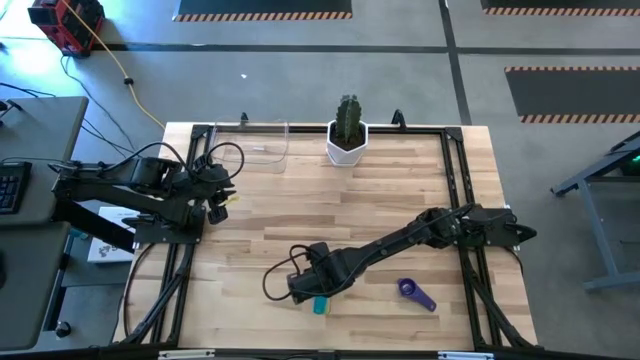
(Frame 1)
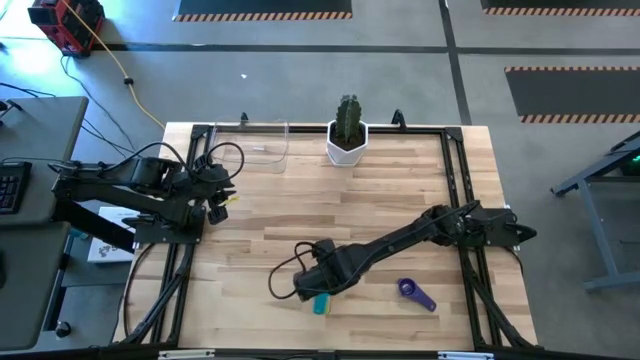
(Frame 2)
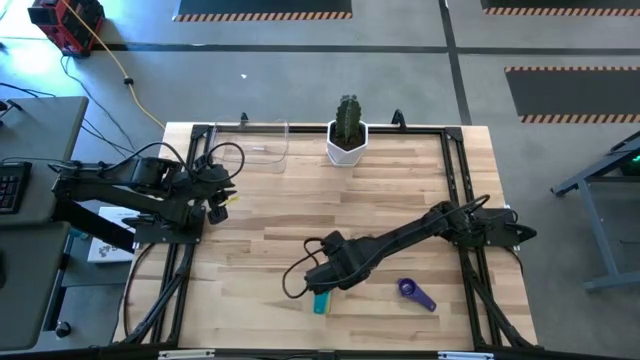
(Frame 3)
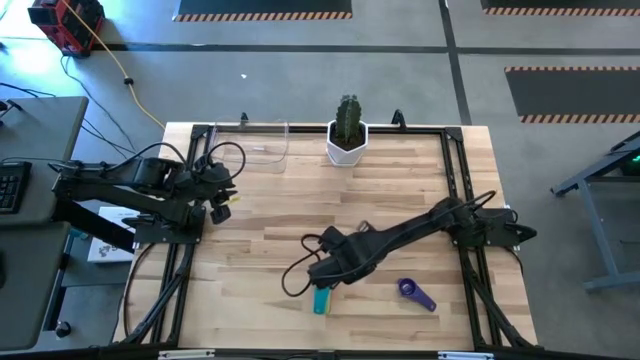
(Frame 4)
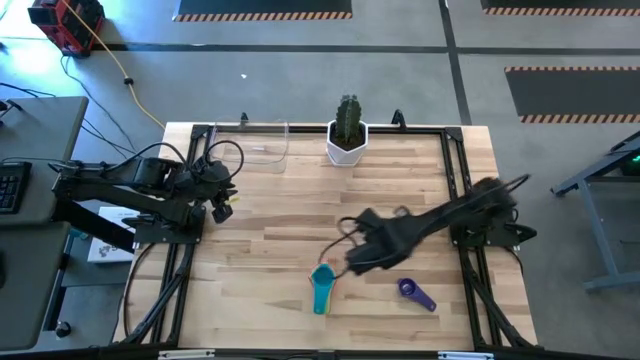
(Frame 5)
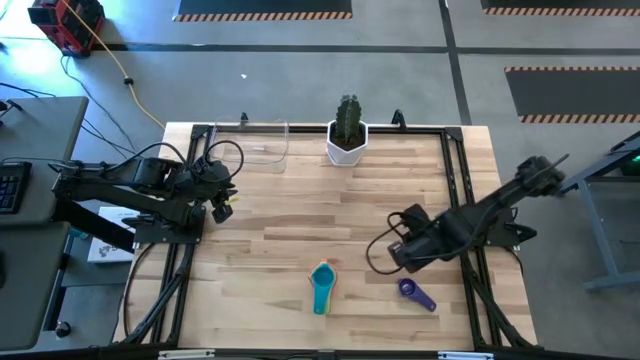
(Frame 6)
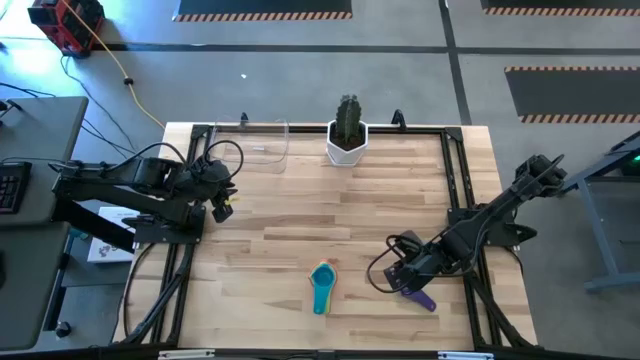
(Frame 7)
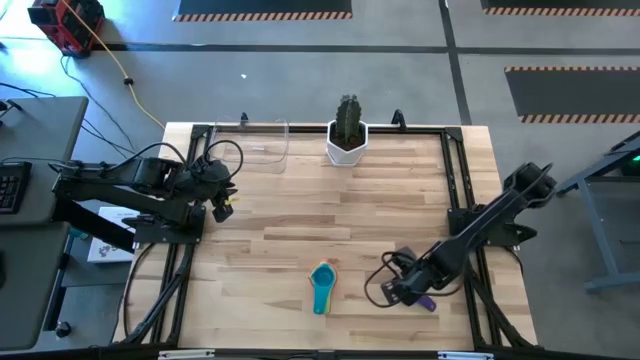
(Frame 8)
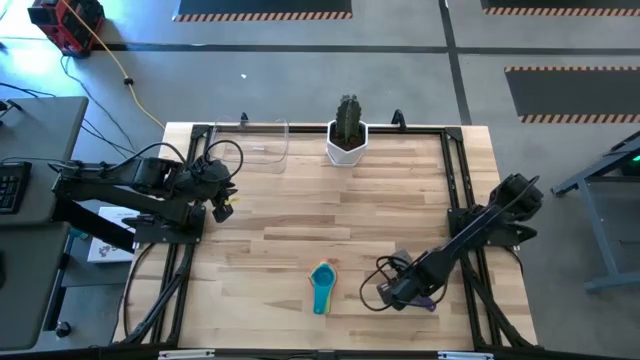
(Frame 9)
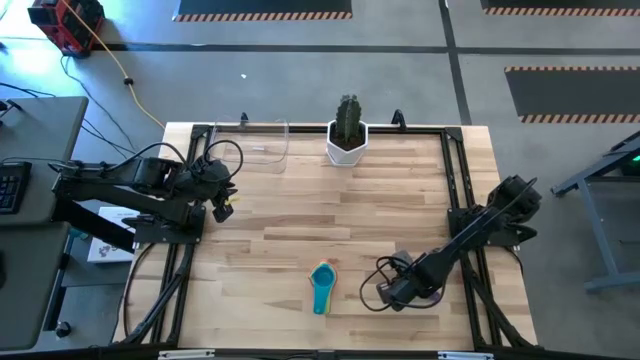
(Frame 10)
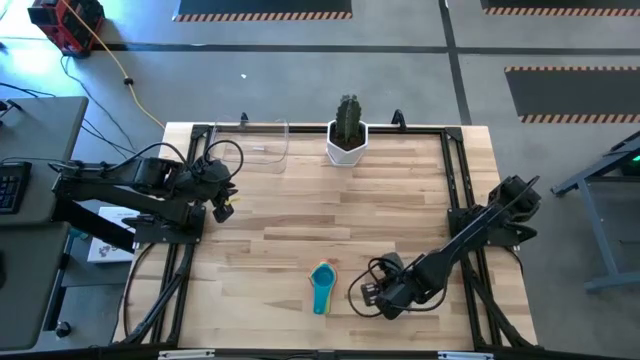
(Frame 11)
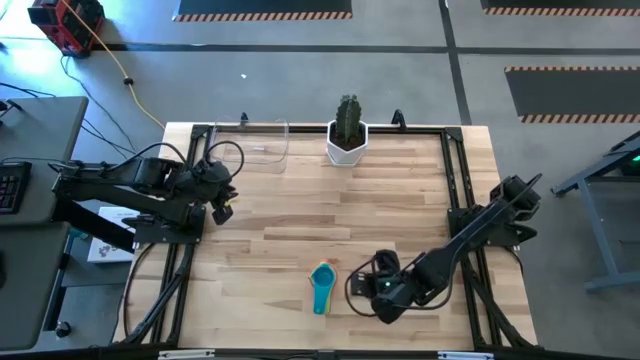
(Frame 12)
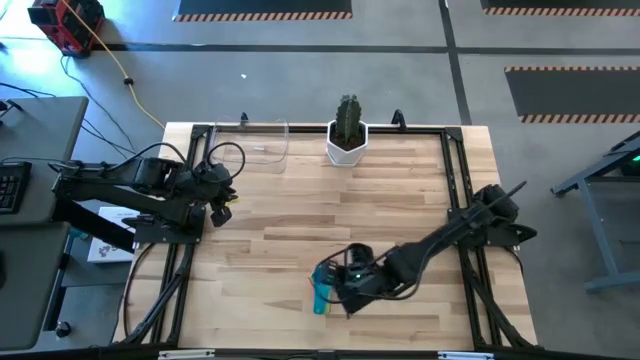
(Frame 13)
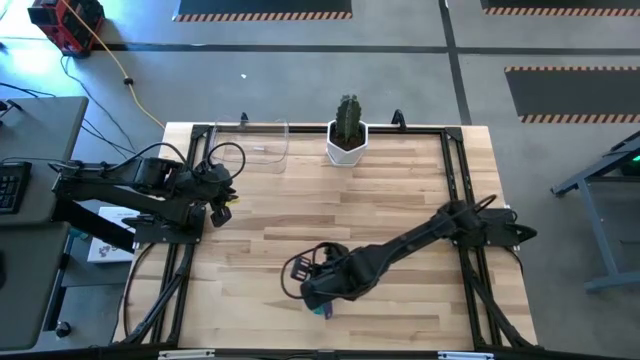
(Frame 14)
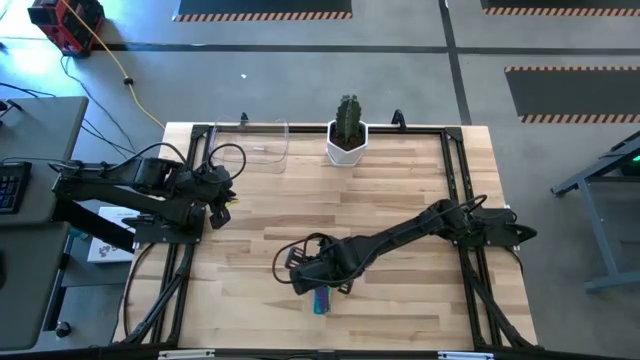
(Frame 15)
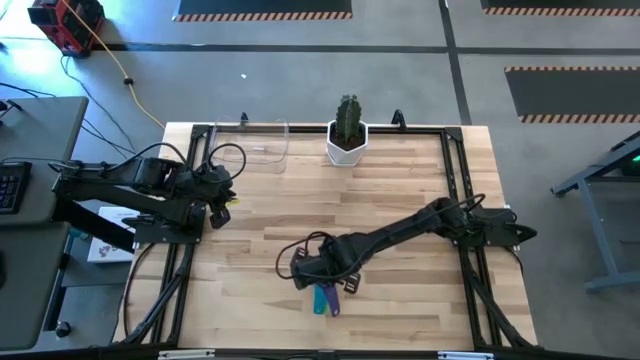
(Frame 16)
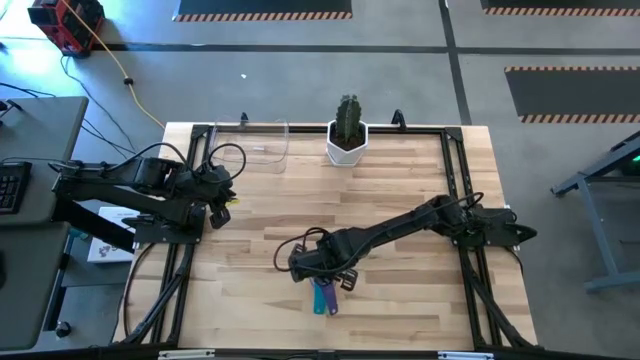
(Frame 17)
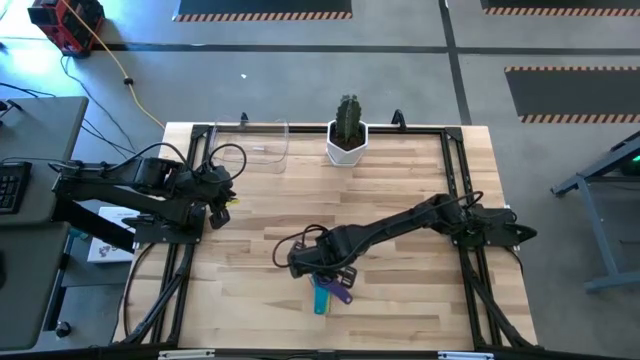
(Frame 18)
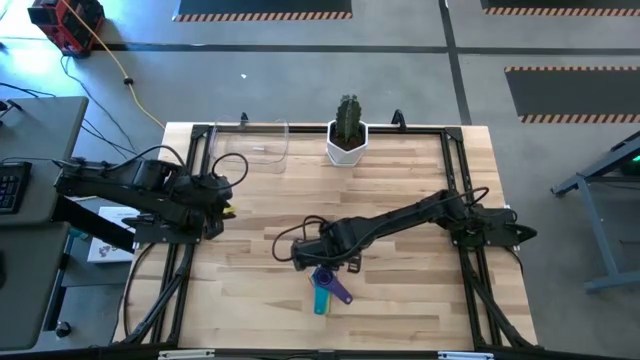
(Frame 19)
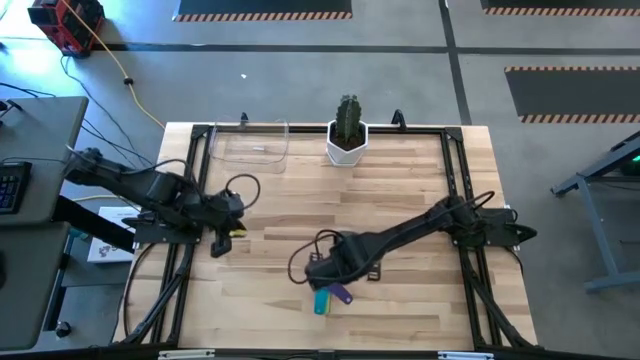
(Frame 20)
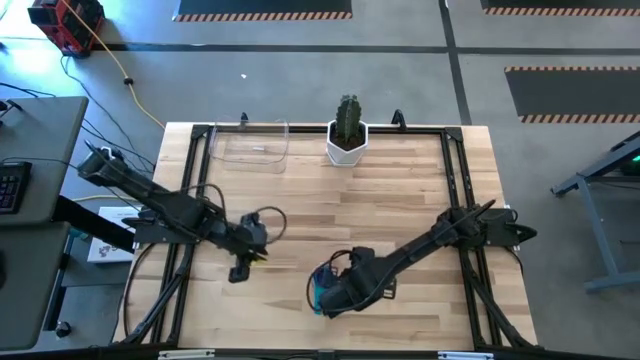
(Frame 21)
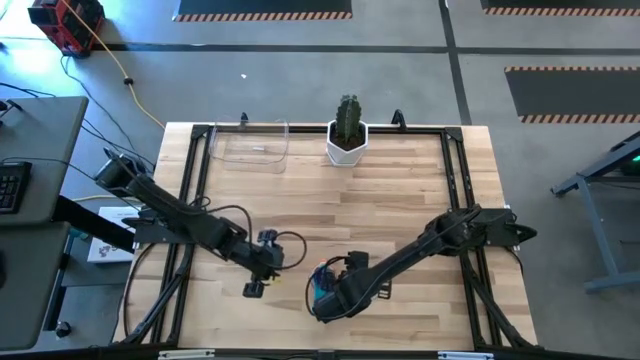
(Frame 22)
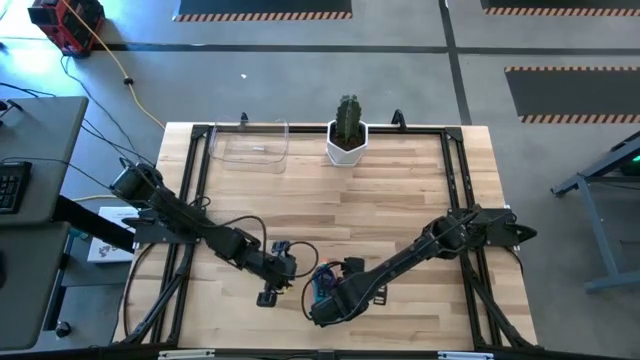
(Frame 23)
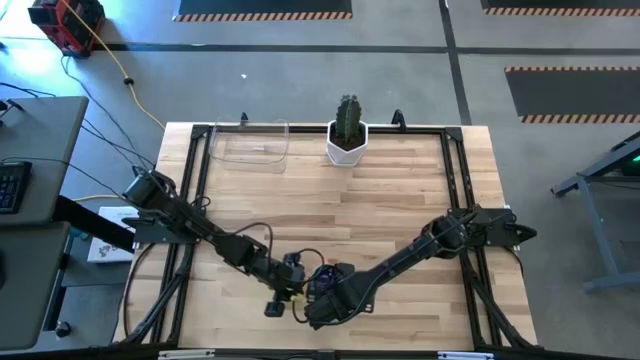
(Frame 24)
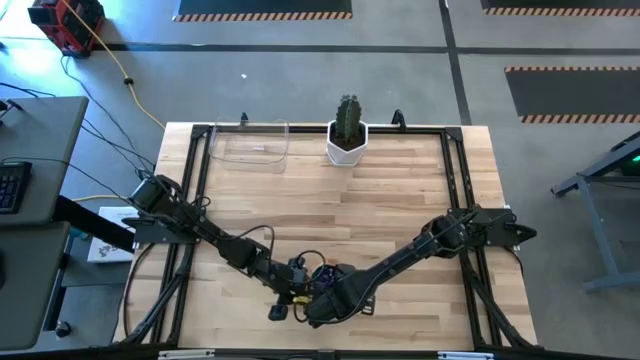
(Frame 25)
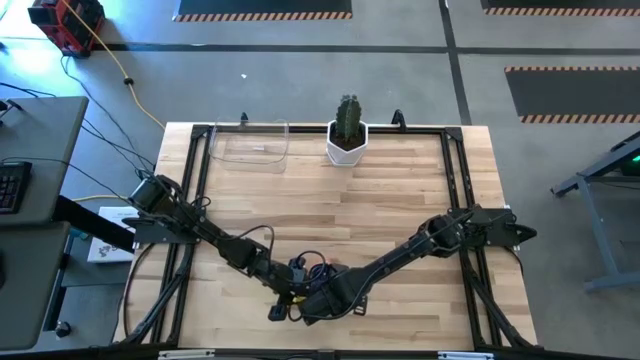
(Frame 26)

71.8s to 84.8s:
Task: Nest measuring cups in basket
Stack the purple measuring cup on the light blue measuring cup

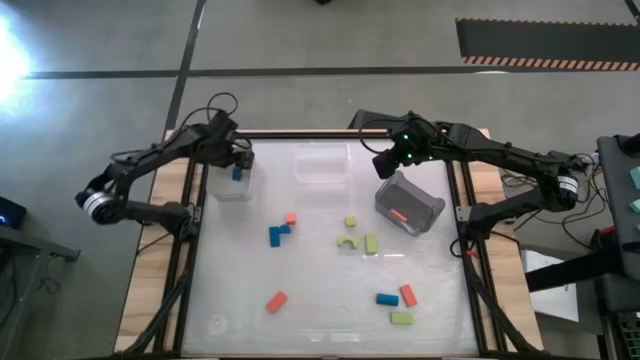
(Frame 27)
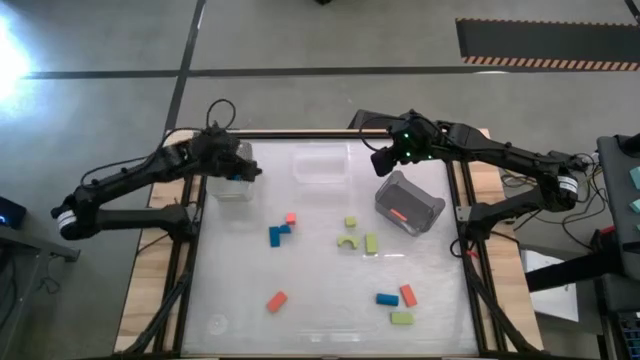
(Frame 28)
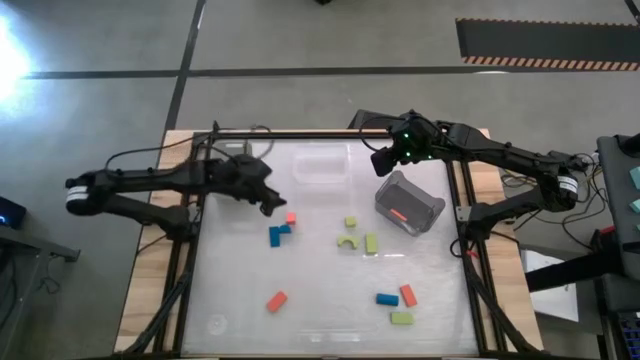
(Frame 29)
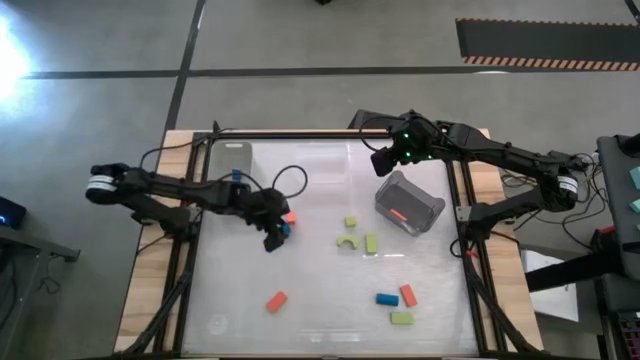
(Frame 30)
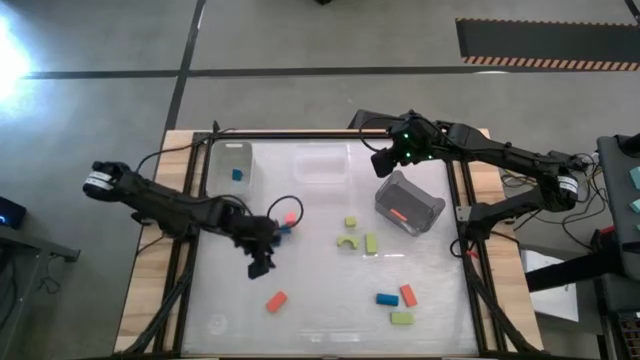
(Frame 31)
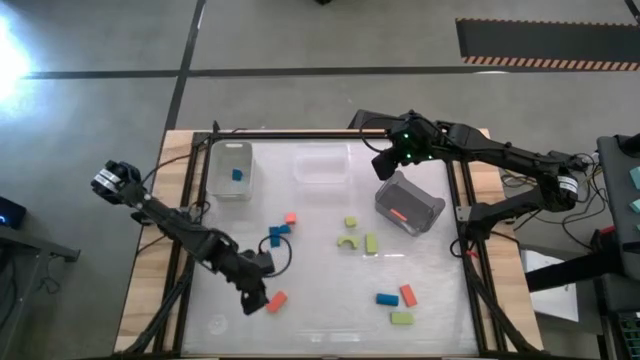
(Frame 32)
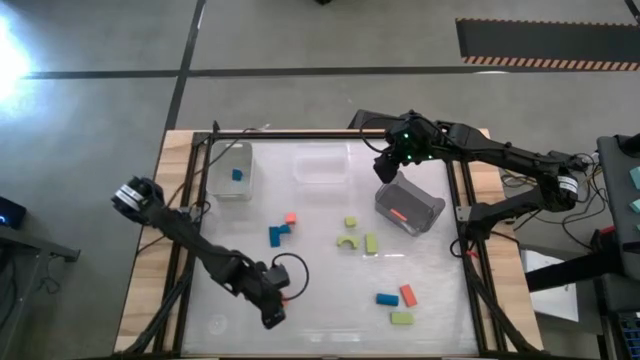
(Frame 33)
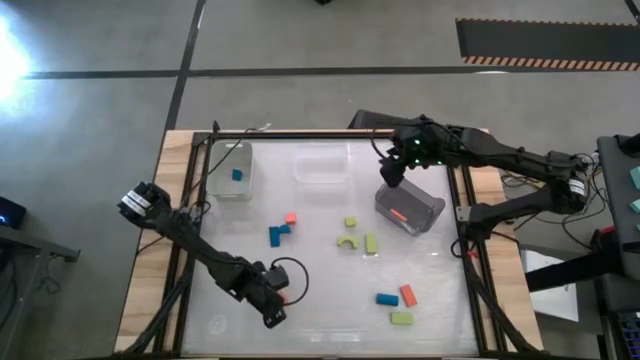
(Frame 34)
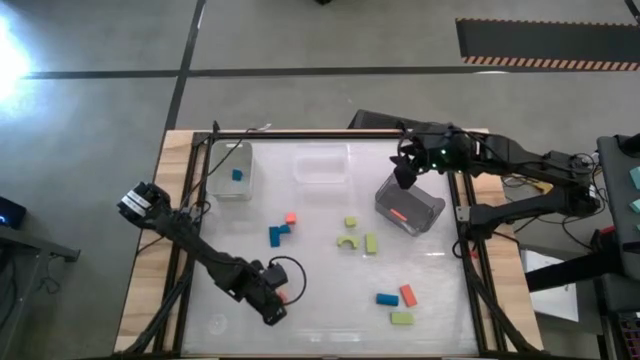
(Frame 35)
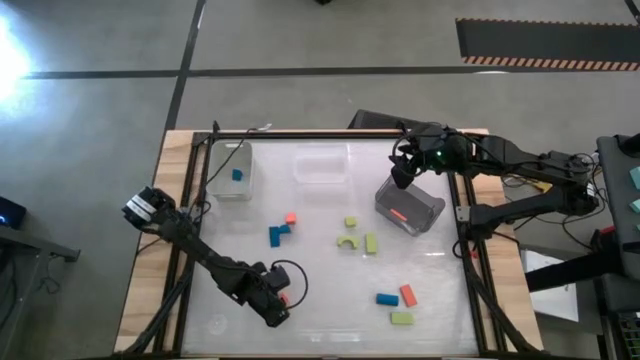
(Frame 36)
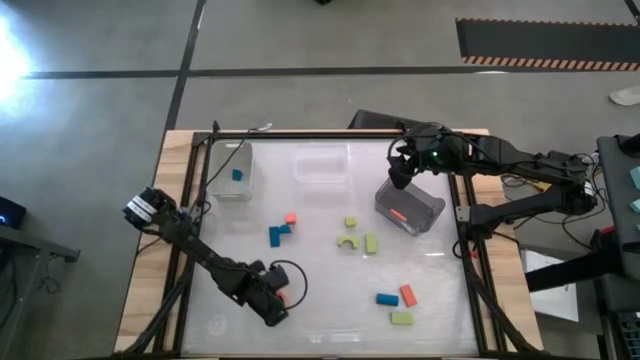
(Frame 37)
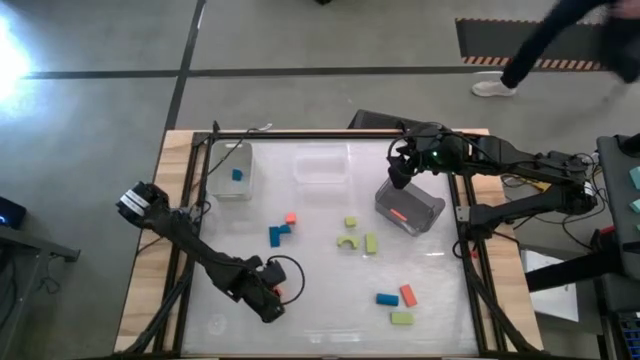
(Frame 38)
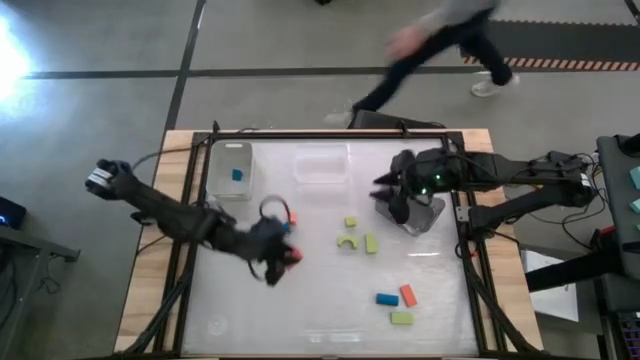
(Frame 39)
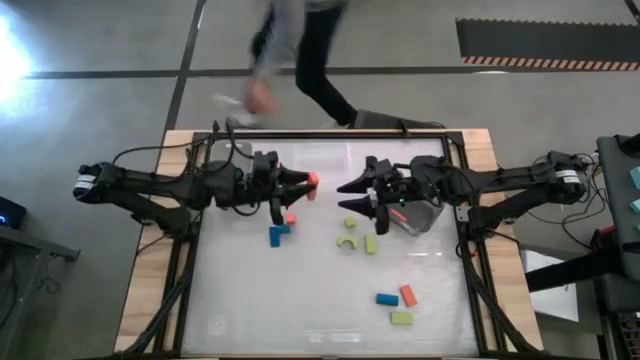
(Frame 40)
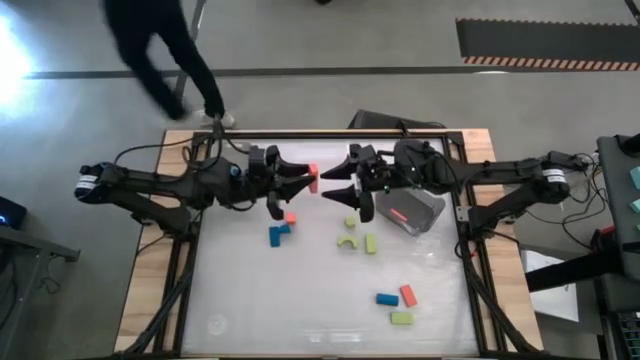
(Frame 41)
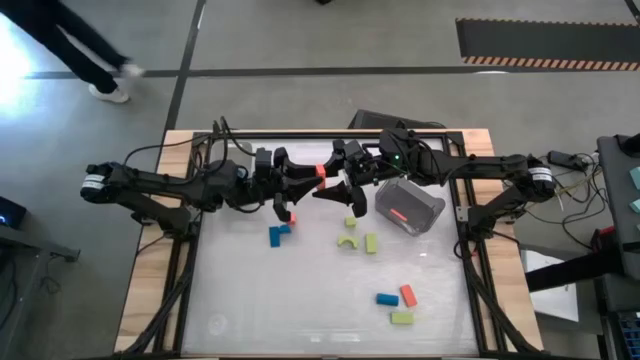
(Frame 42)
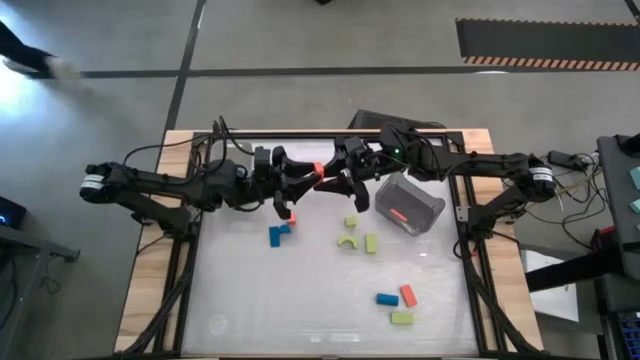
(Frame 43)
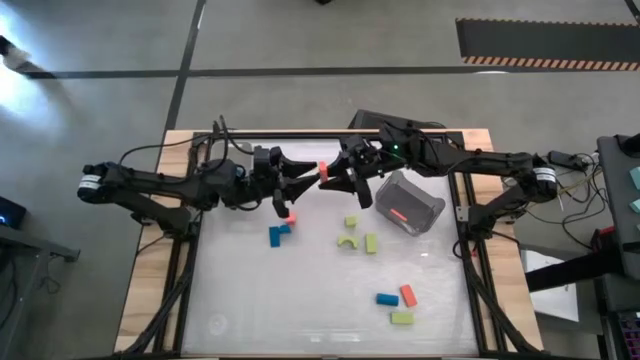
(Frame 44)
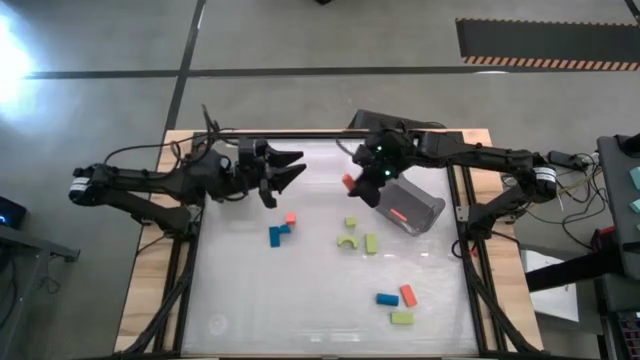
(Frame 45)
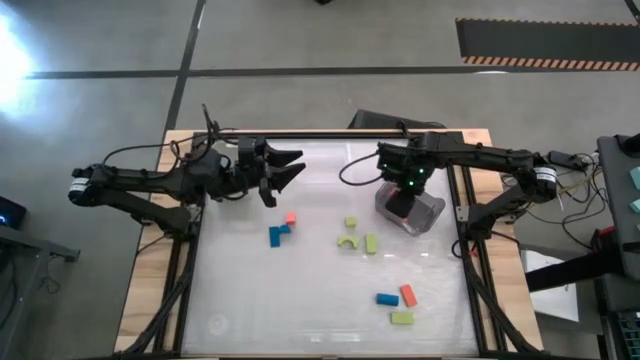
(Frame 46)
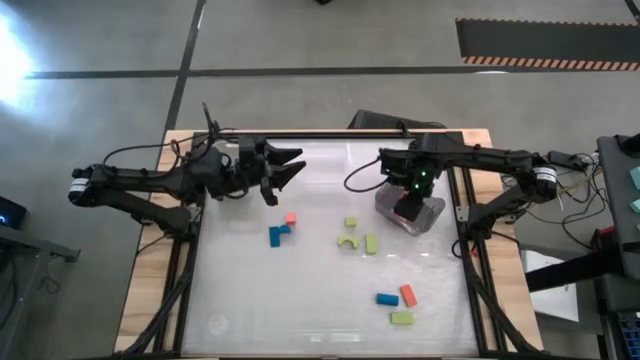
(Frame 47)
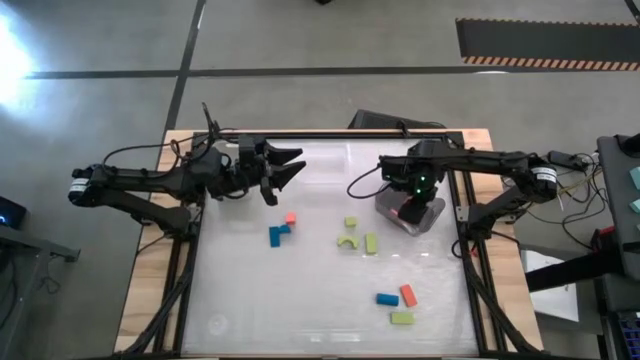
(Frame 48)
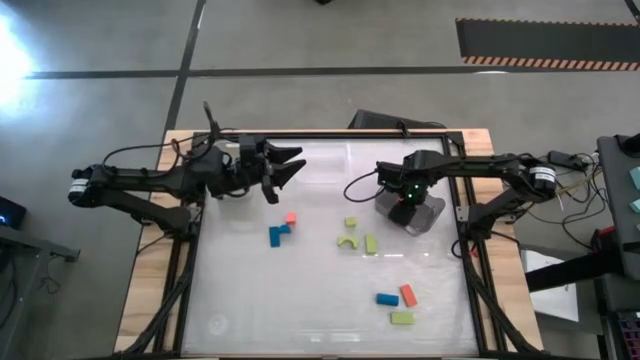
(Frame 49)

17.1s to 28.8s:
Task: Sort & place blocks by color
Put the orange block into the black bin
